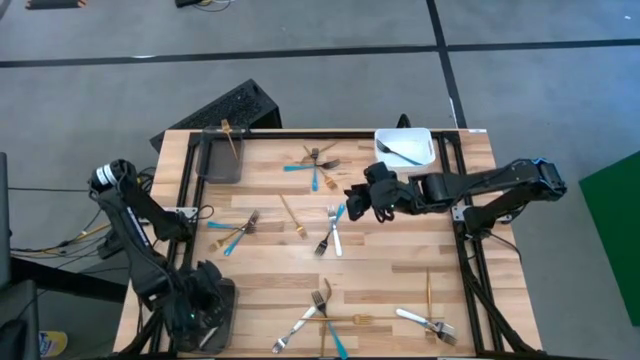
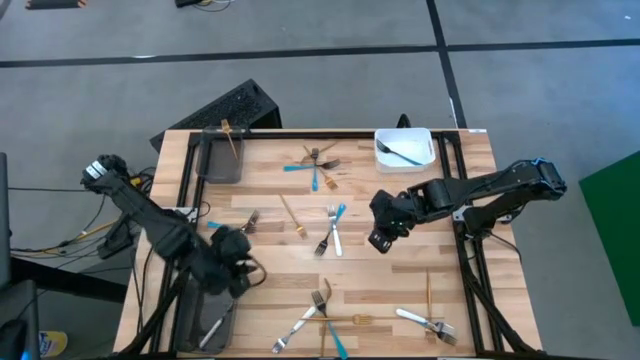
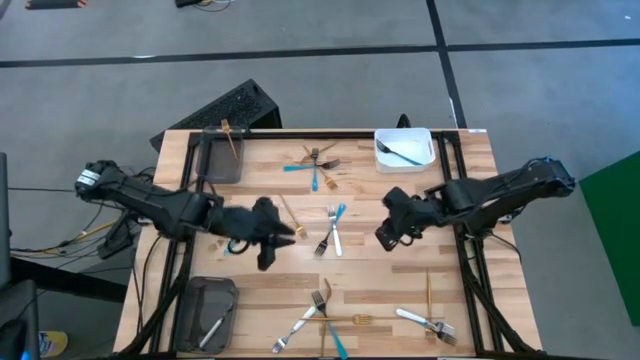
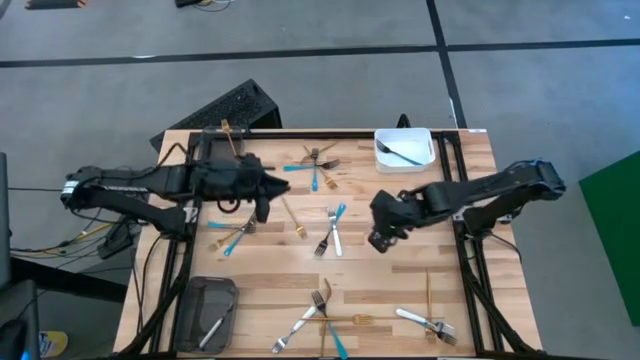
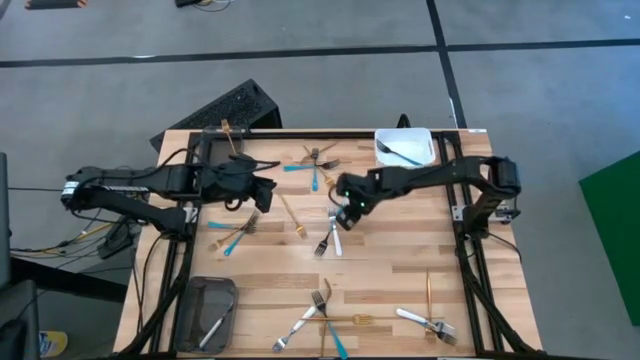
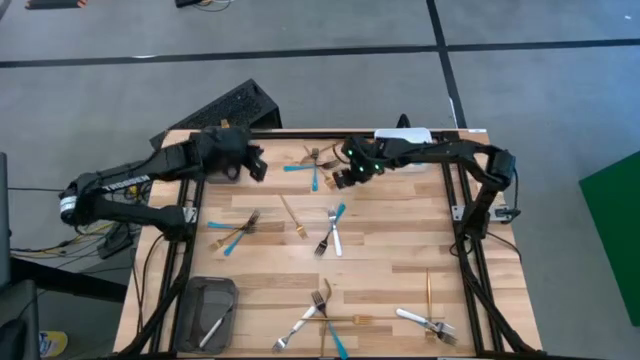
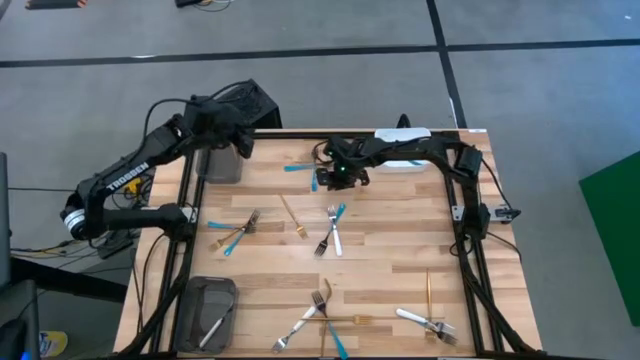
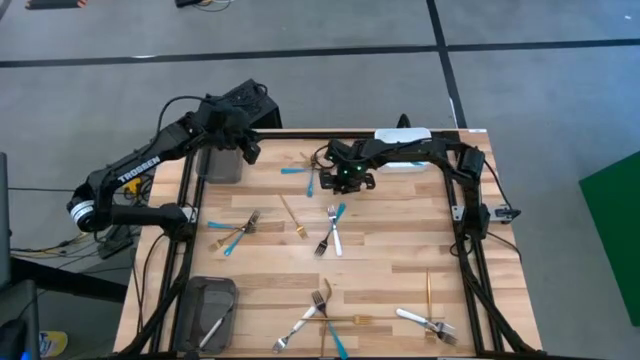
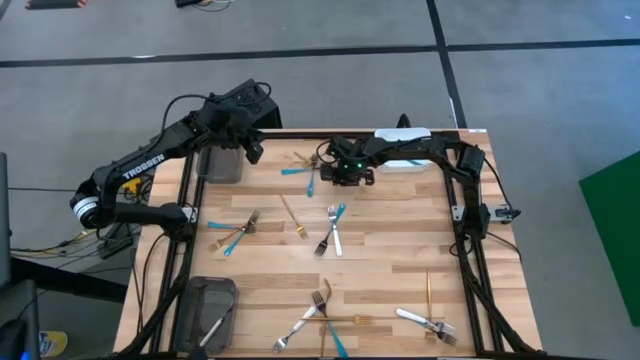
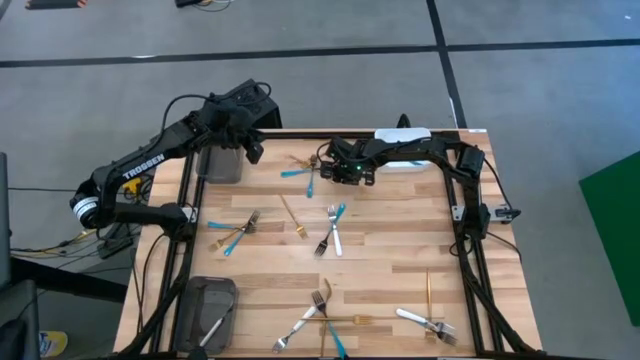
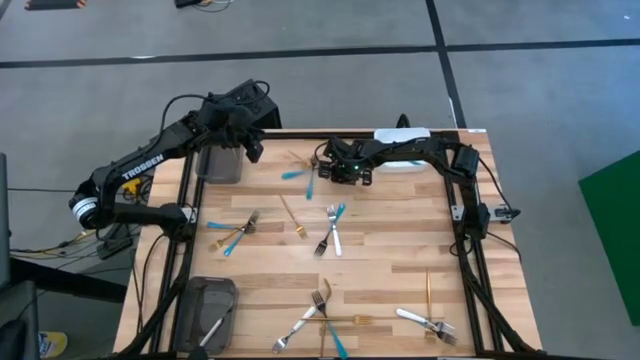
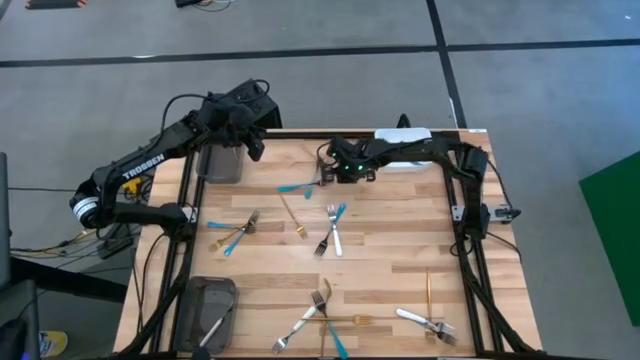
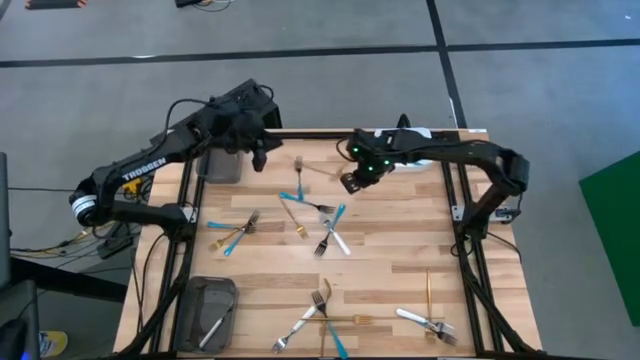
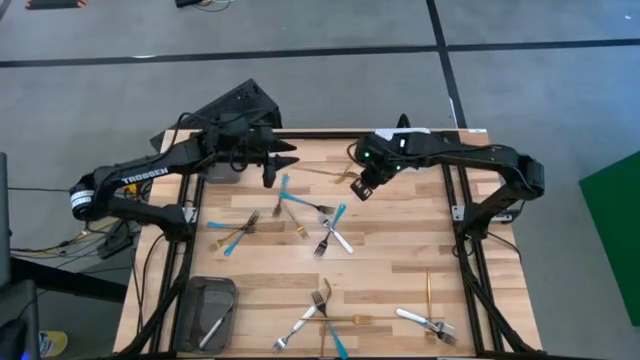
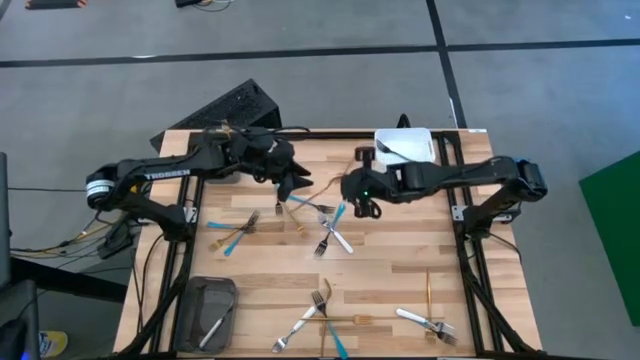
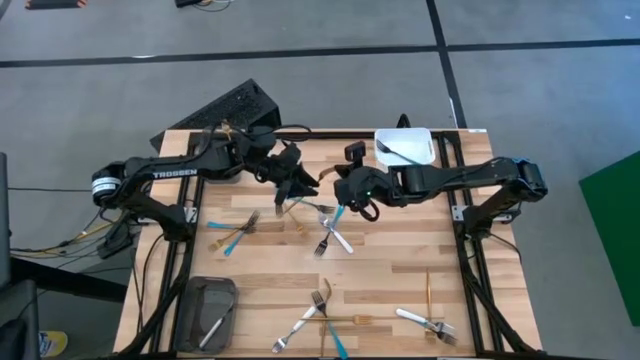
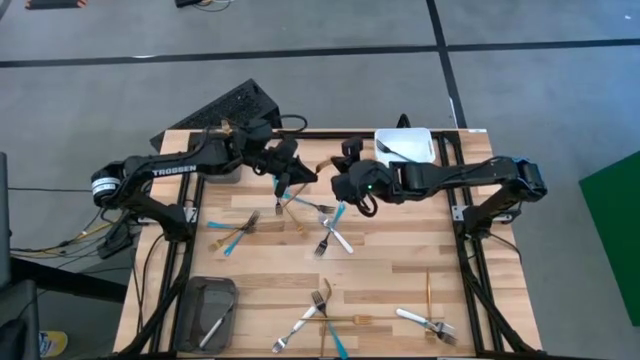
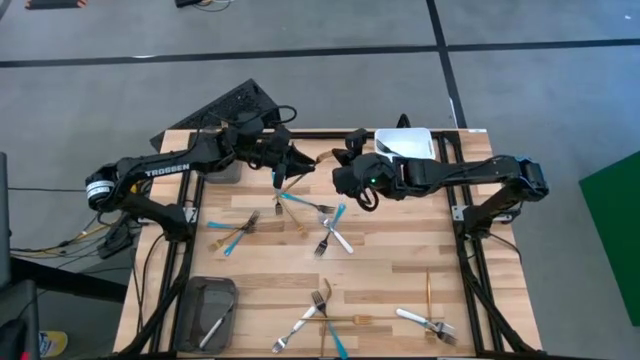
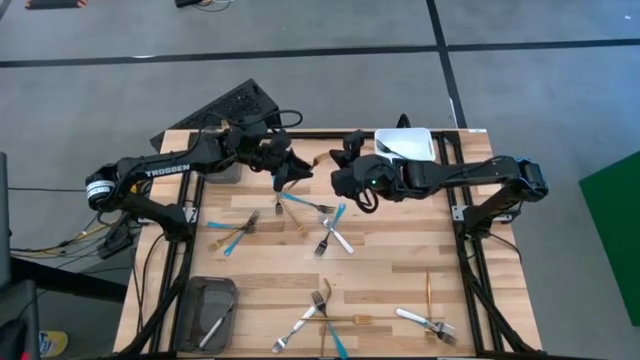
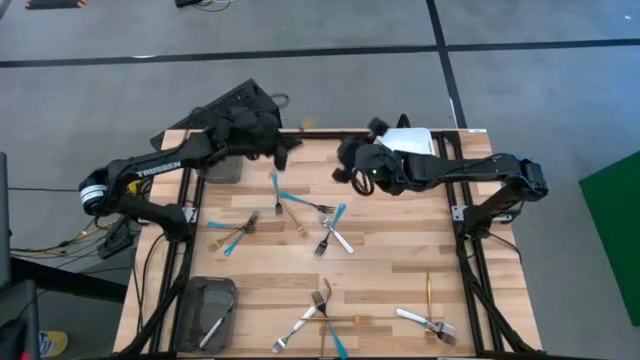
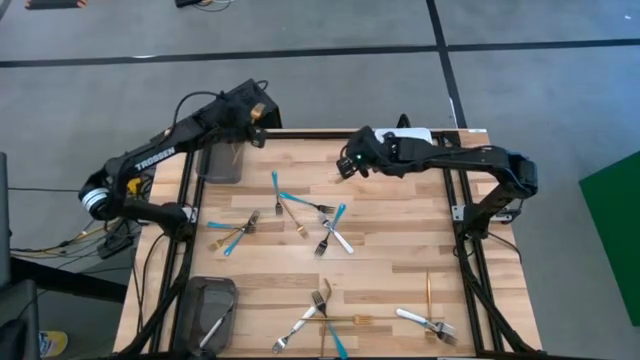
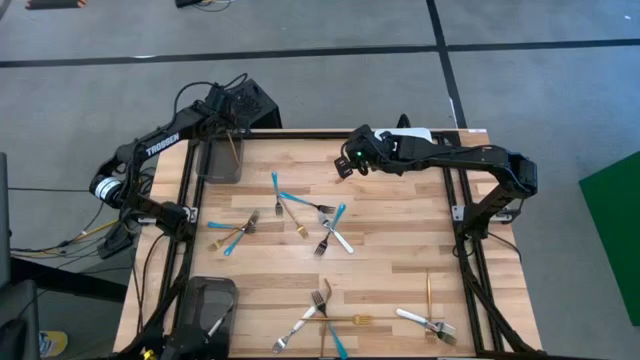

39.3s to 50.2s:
Task: Sort silverware by color (type)
Put the gold fork into the top black bin

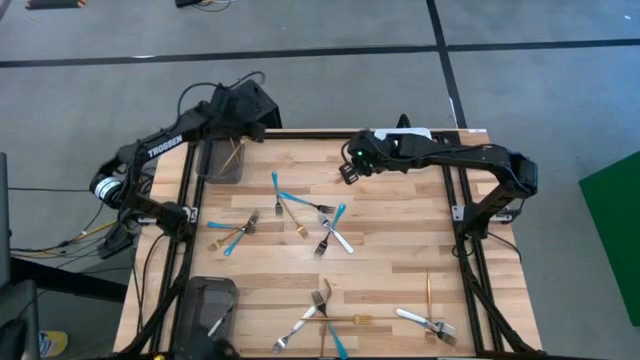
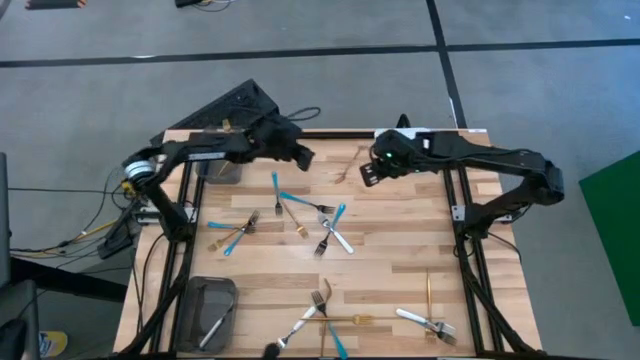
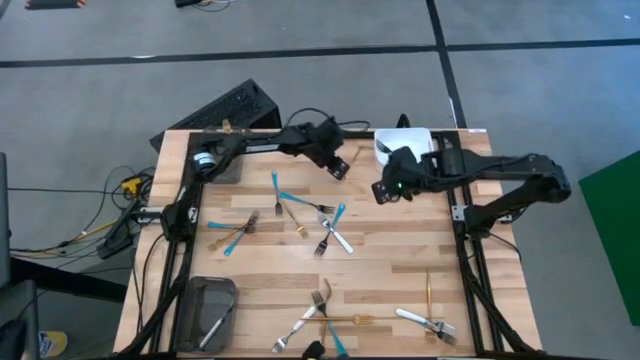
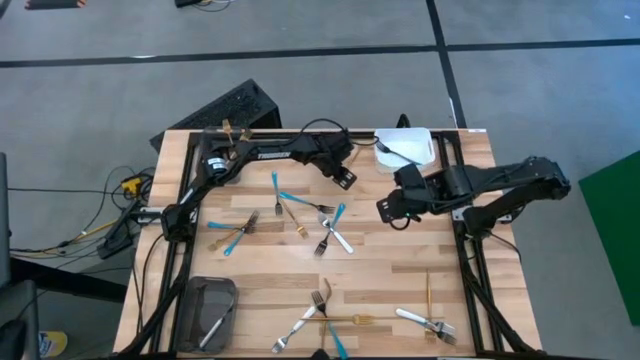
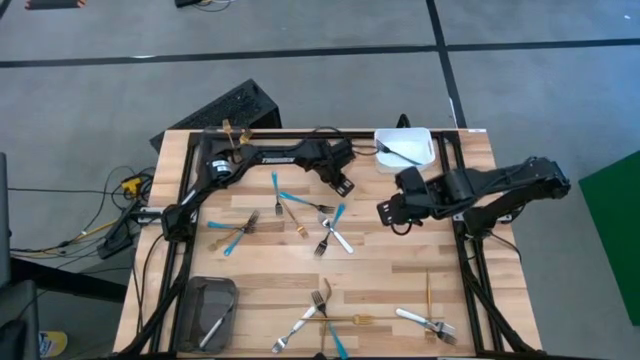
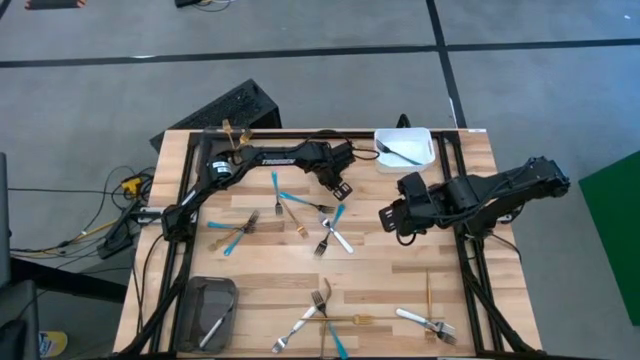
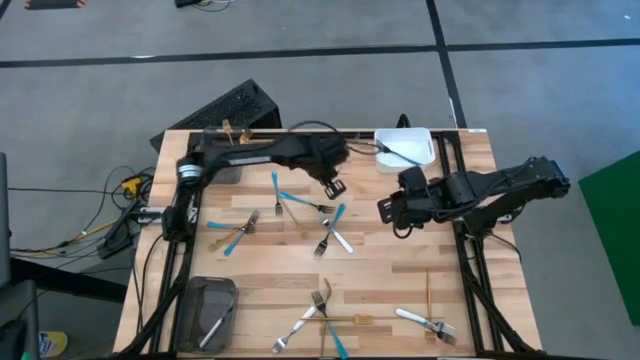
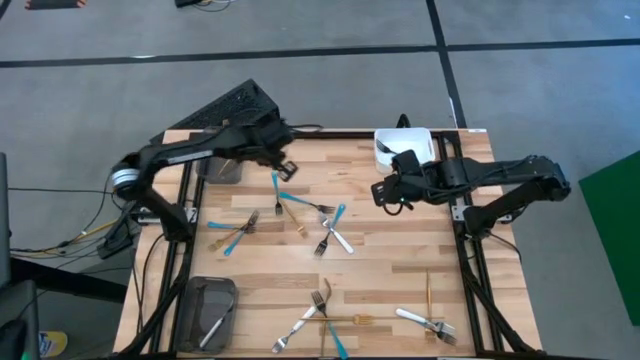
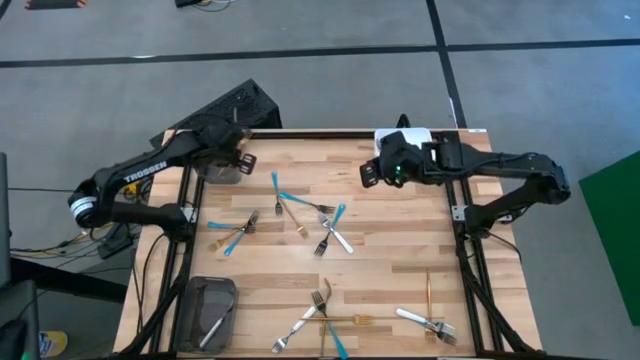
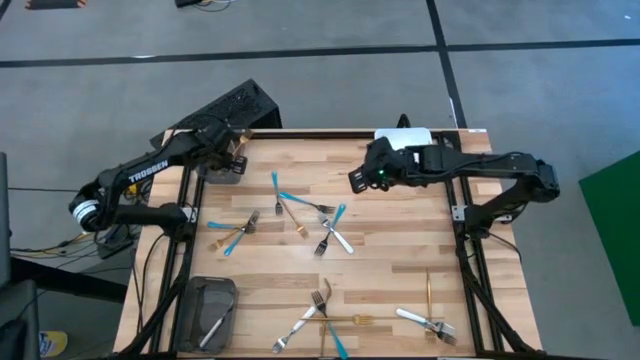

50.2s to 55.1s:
Put the gold fork into the top black bin

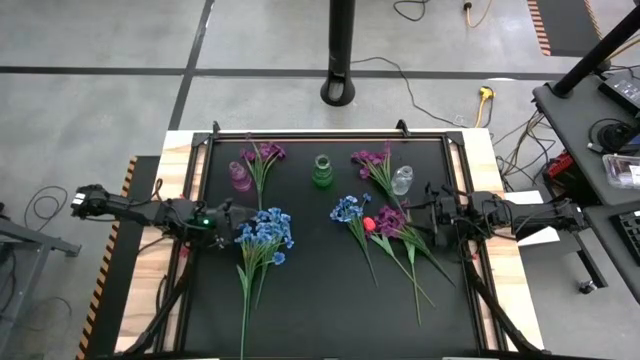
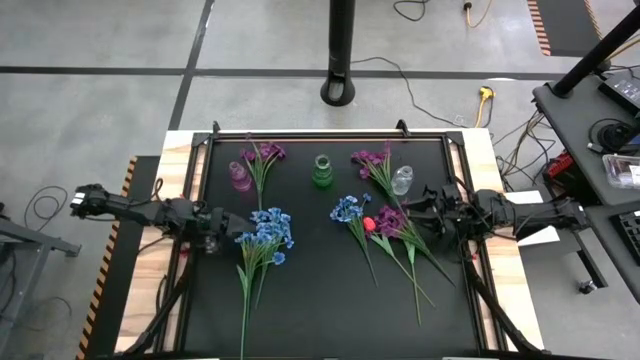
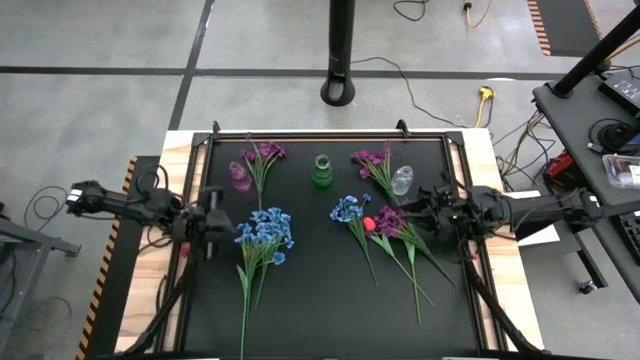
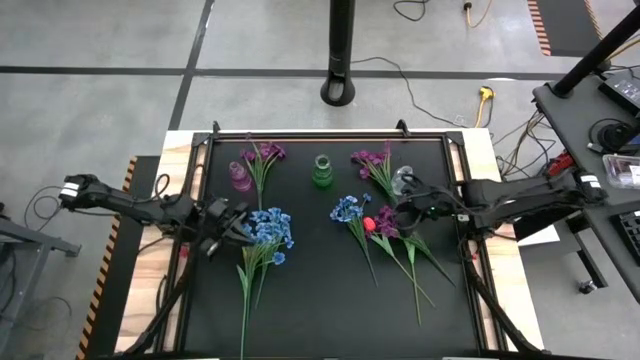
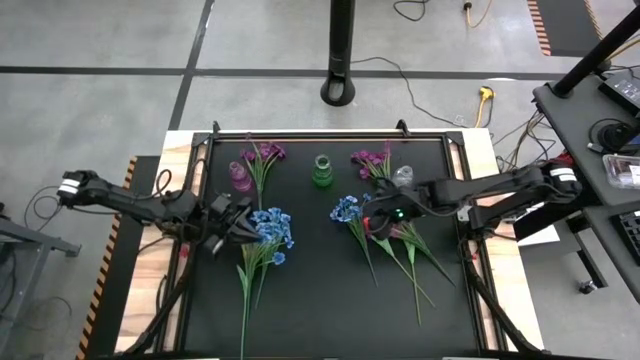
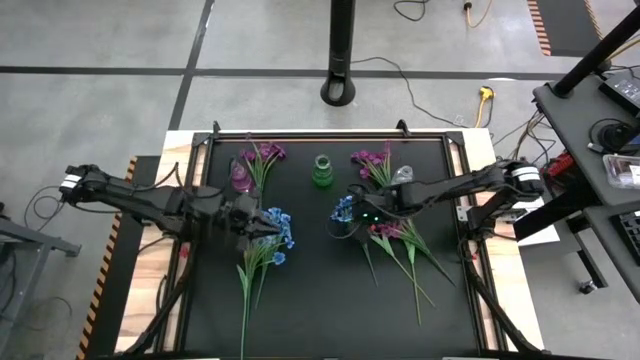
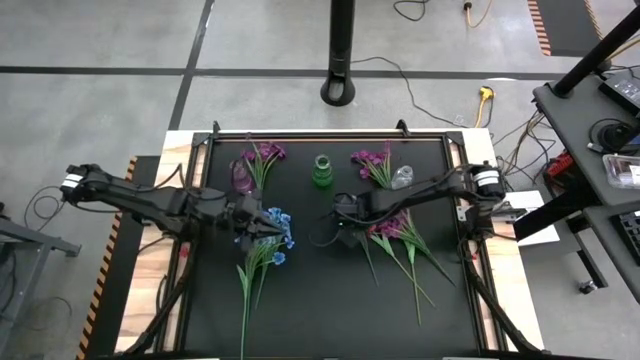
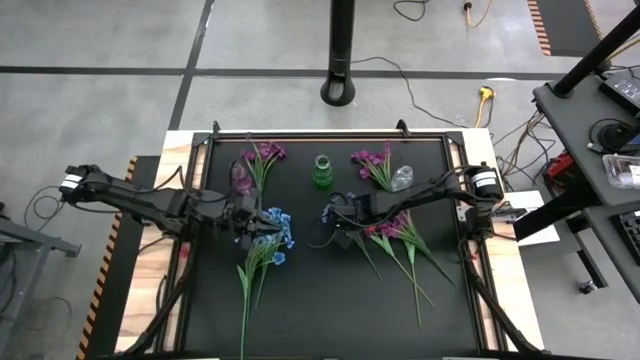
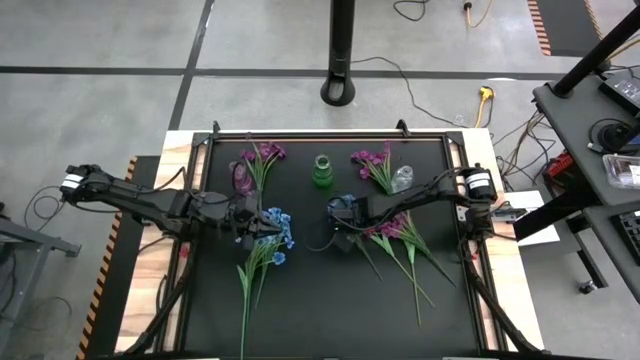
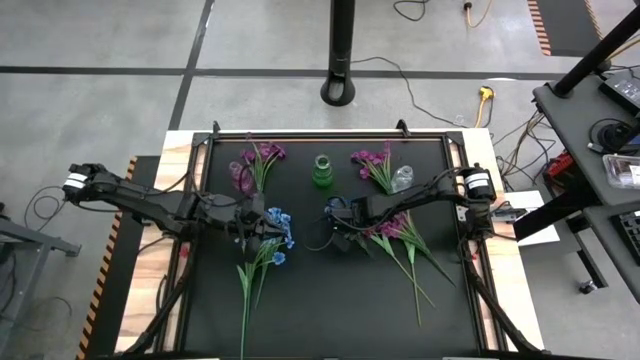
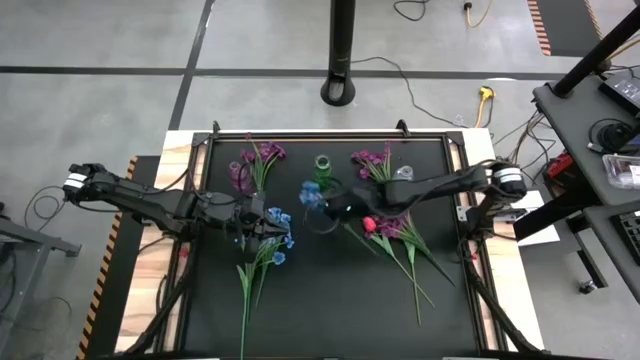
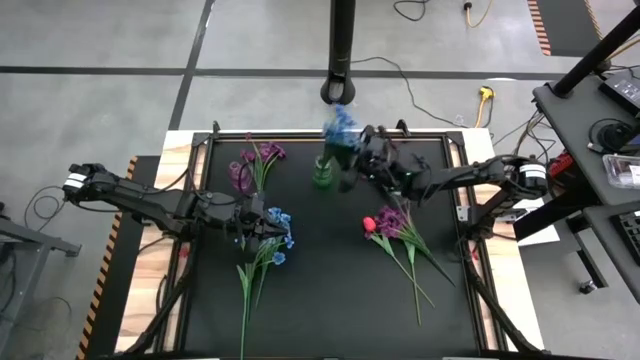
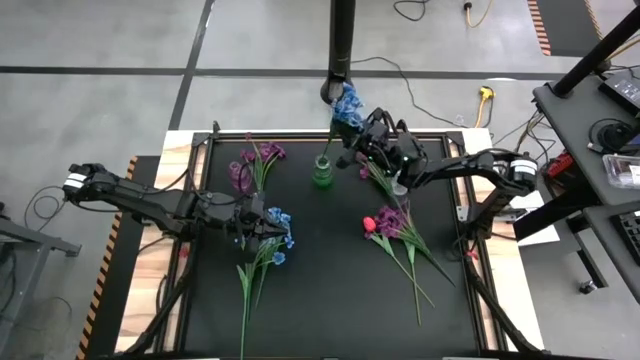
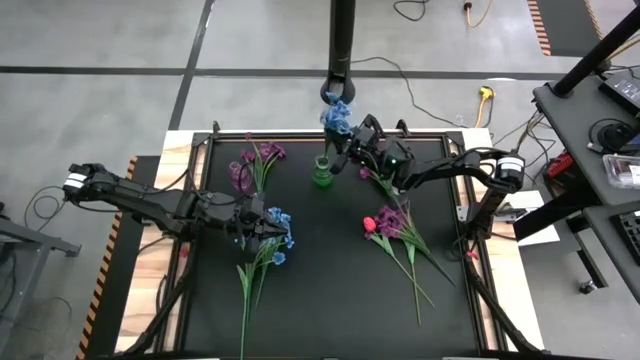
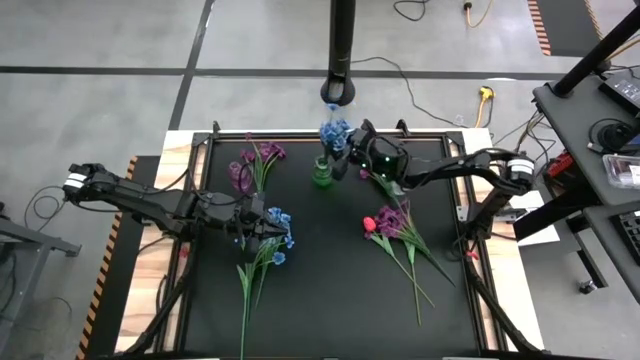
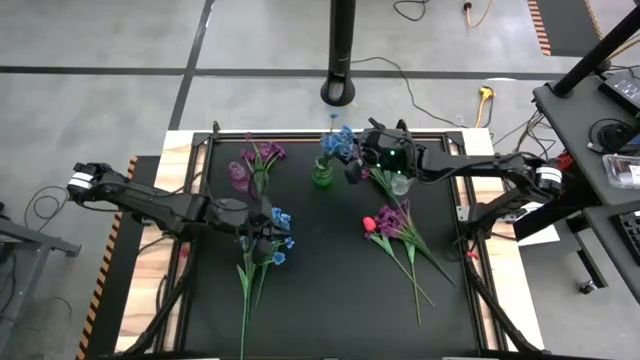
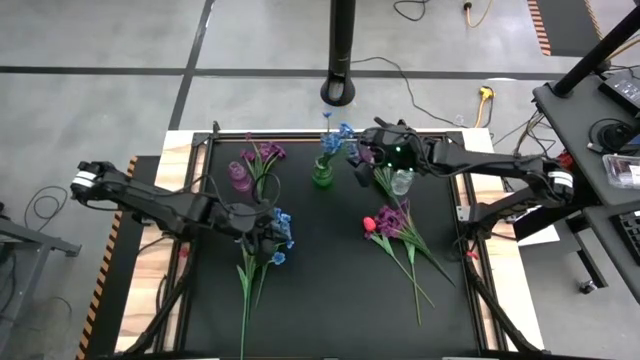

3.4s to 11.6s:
Task: Sort flowers into vase by color
Put the middle right blue flowers into the green vase
